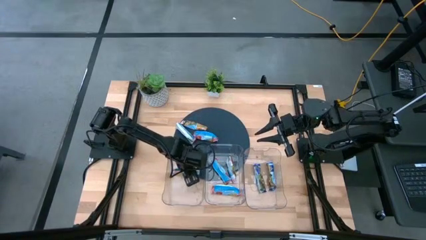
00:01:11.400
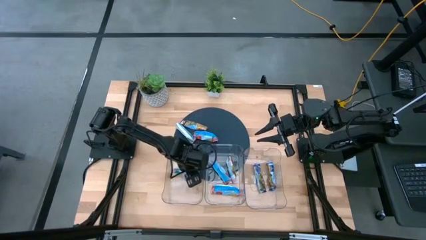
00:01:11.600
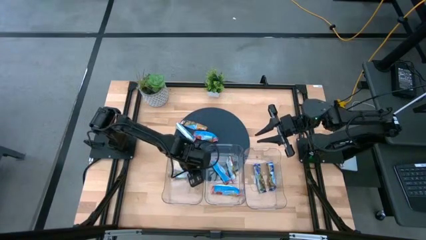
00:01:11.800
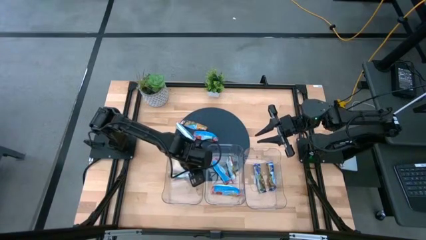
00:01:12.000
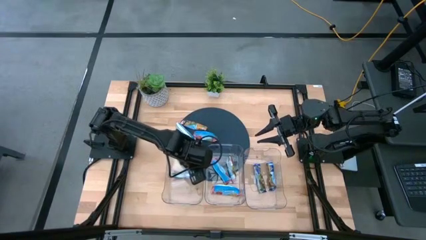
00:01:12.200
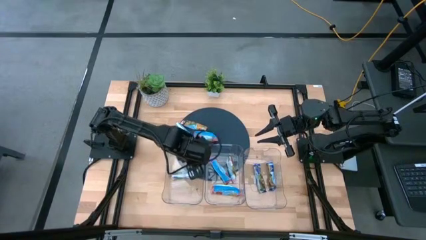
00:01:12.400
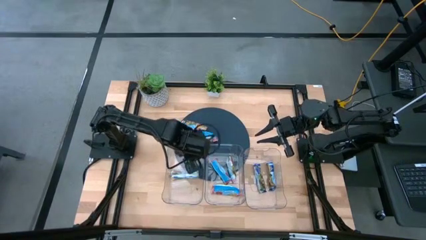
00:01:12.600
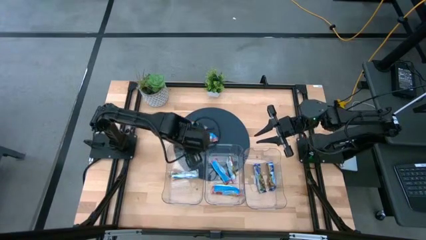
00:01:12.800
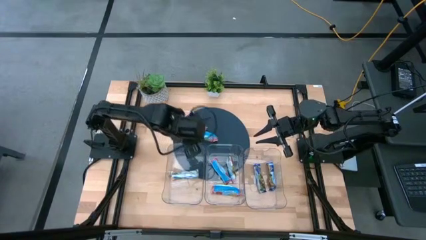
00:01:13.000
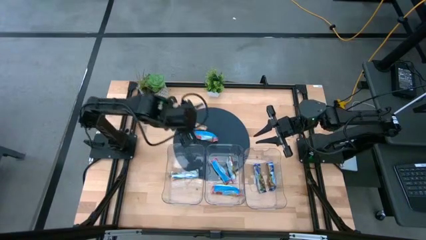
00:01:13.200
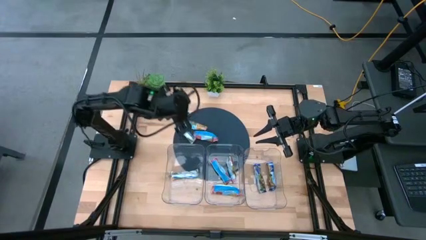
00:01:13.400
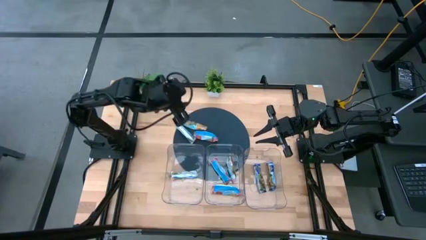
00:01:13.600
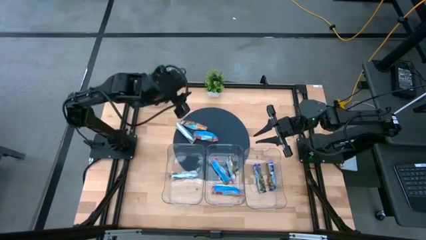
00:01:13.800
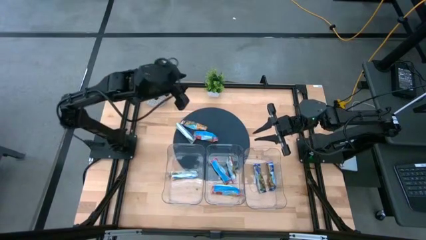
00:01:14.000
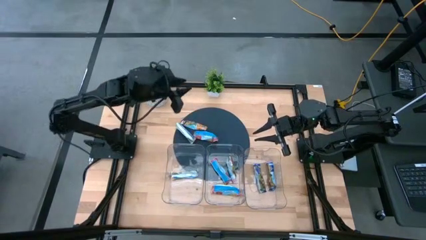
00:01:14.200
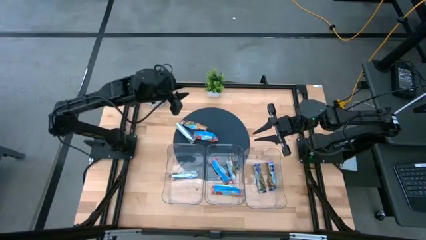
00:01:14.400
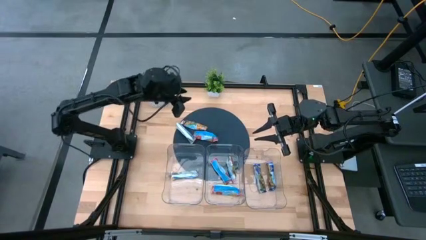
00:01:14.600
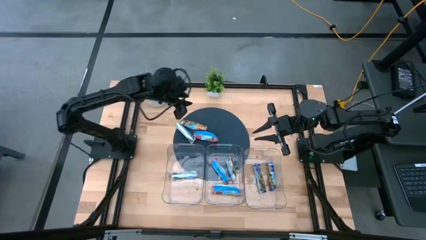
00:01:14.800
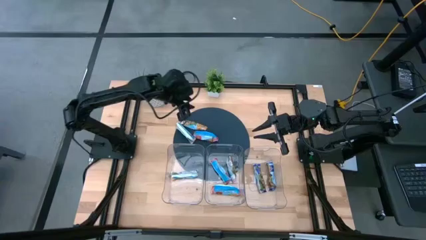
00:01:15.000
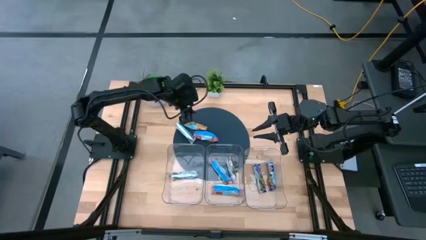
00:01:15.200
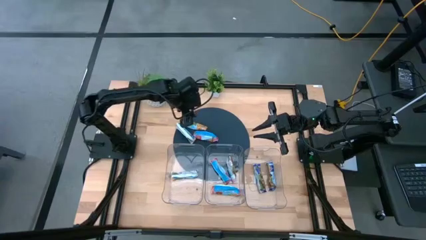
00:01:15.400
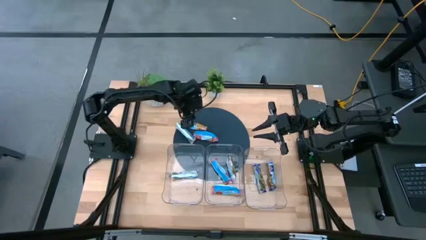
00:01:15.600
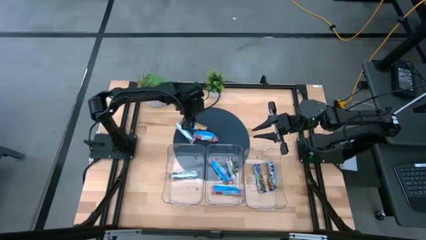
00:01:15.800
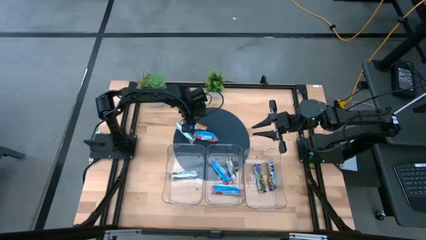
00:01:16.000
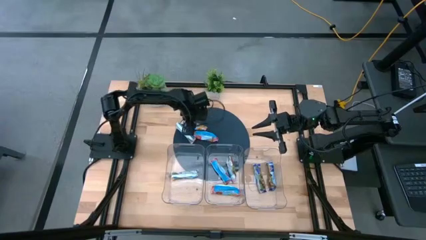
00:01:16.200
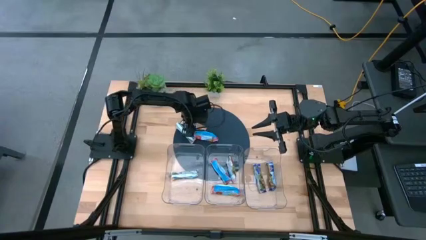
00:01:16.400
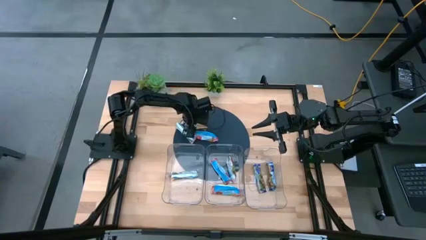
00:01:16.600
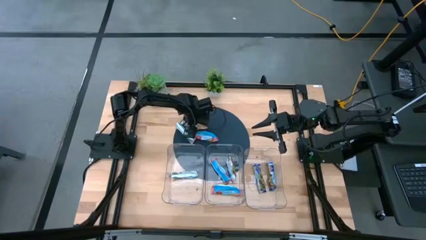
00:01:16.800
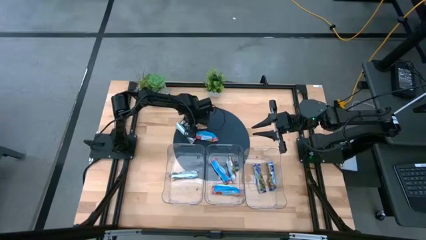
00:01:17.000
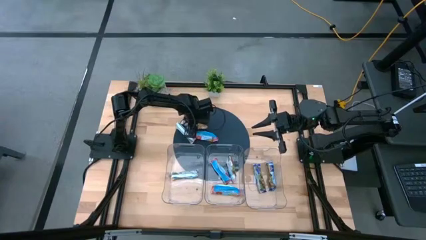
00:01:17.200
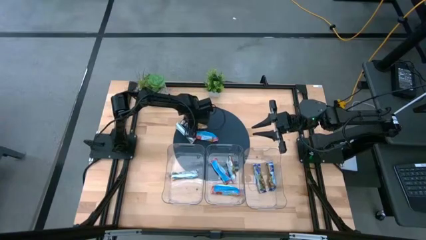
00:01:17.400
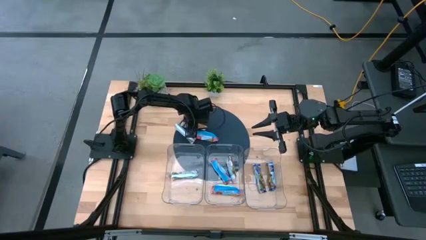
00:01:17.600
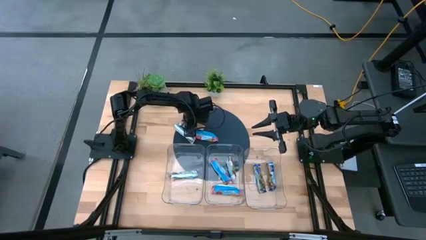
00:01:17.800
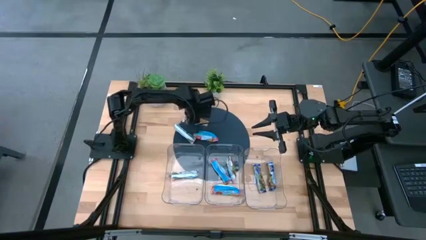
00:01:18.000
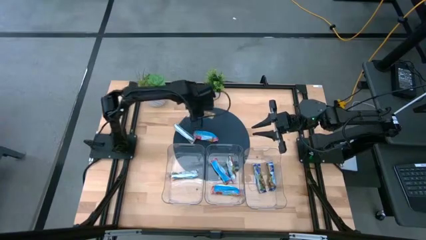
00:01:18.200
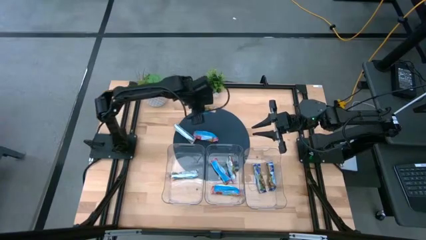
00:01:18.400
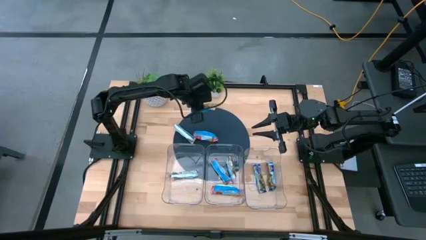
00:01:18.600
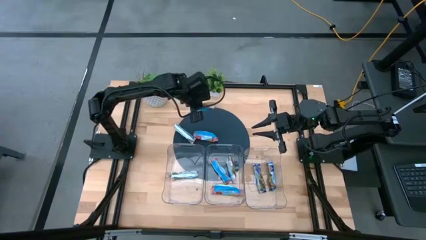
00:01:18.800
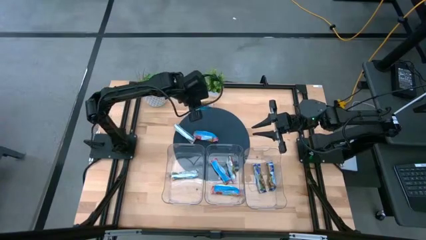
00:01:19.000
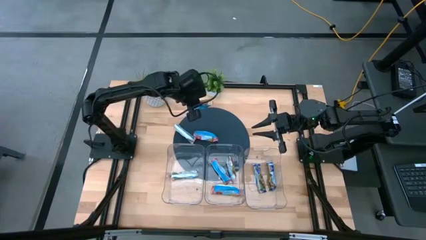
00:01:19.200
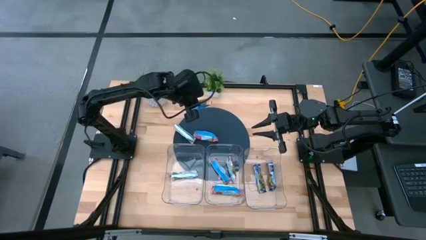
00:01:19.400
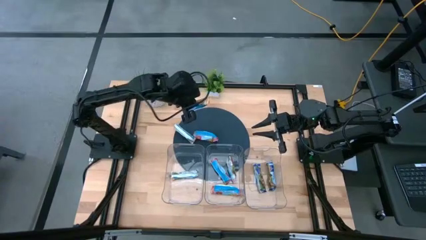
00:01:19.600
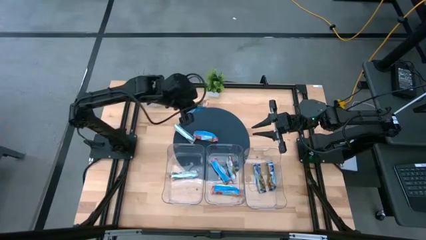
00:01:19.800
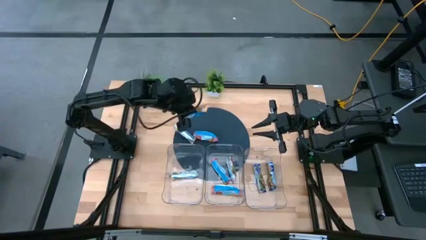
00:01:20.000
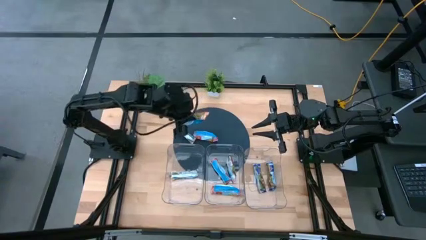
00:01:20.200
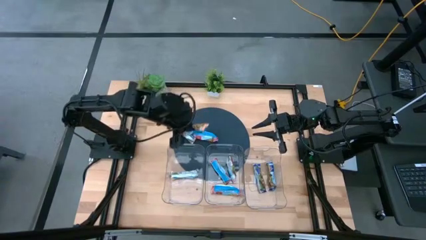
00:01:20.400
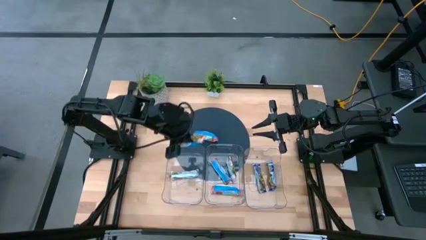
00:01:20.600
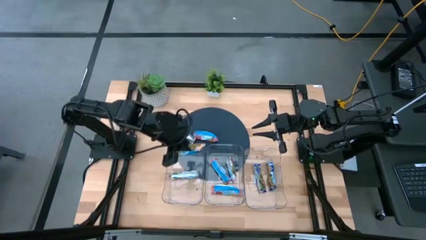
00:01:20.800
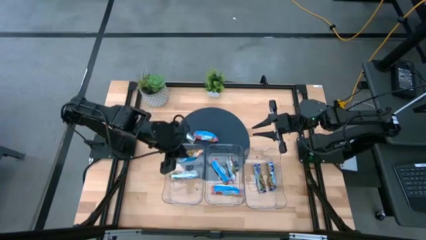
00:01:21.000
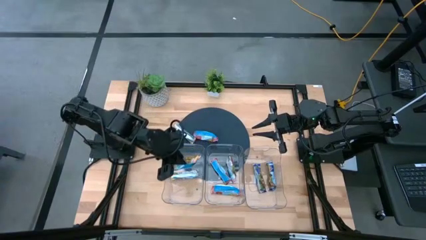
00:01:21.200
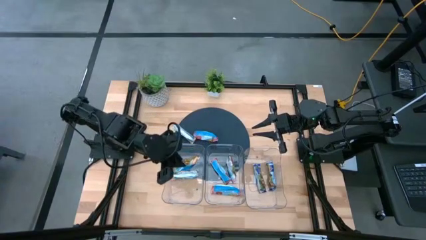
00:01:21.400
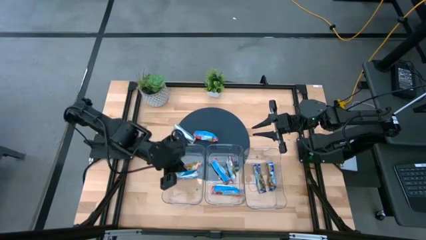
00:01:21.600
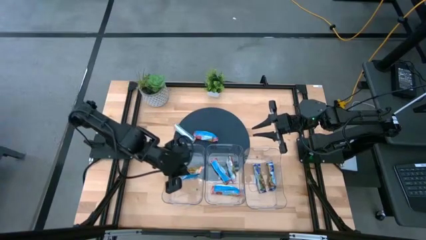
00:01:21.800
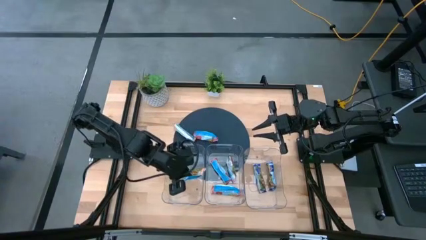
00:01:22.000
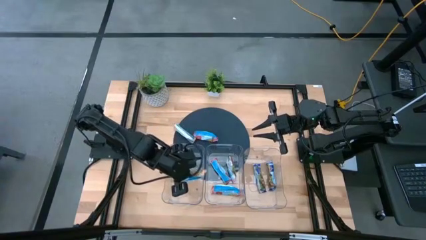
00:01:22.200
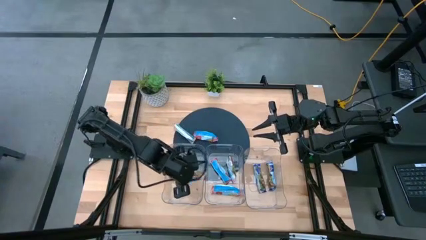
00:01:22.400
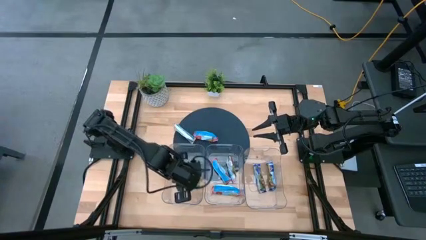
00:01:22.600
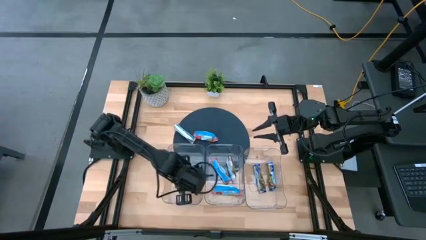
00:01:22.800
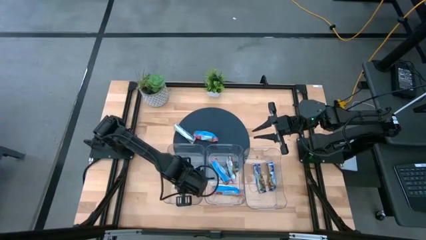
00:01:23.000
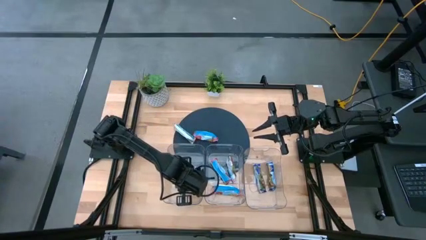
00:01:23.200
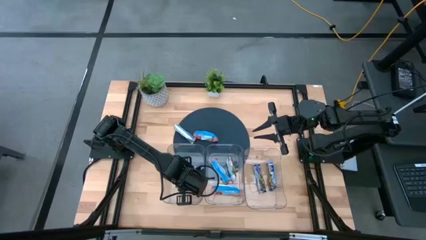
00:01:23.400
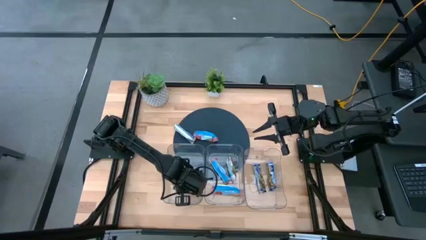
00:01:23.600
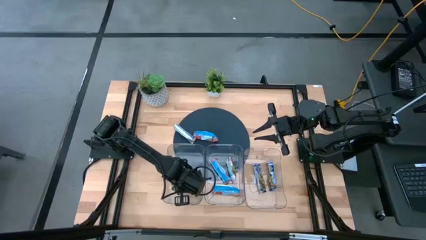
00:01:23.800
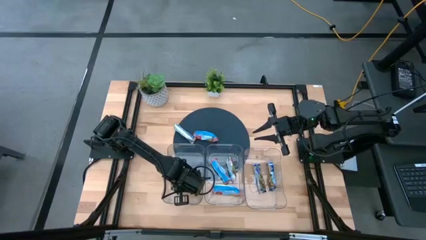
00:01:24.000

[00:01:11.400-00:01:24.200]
Task: Pick and place Granola Bars by type
Put the orange granola bar into the left transparent bin

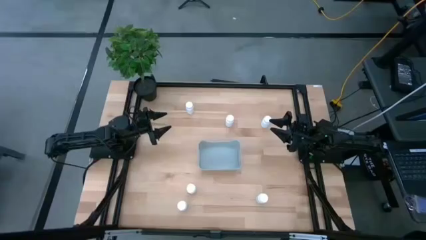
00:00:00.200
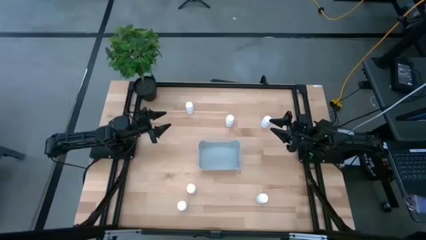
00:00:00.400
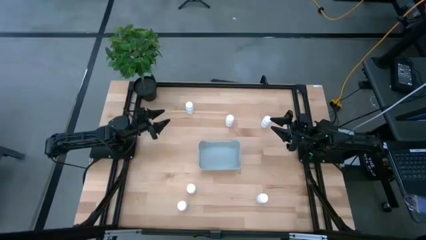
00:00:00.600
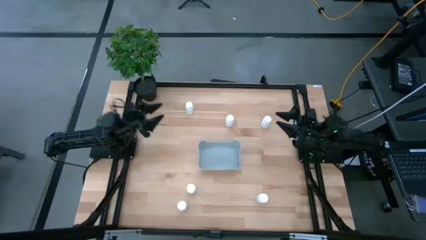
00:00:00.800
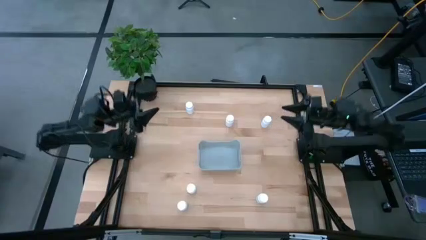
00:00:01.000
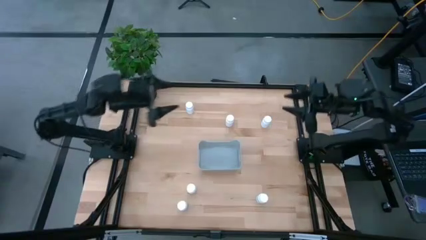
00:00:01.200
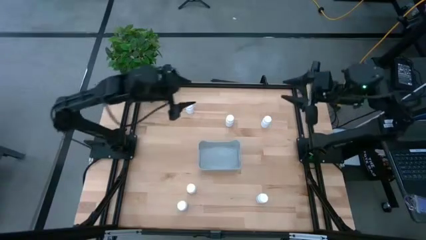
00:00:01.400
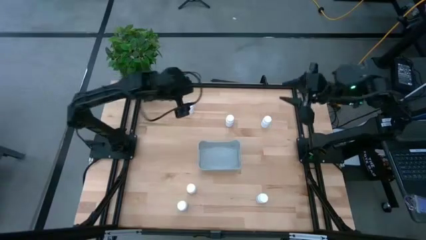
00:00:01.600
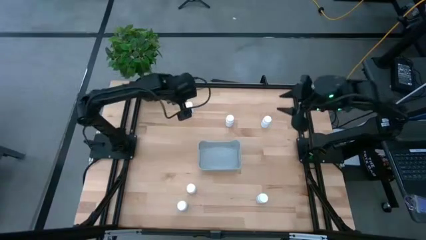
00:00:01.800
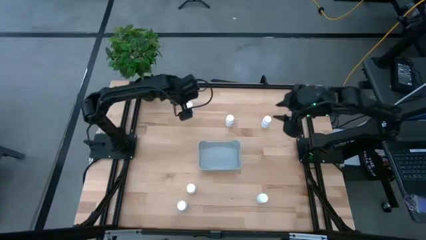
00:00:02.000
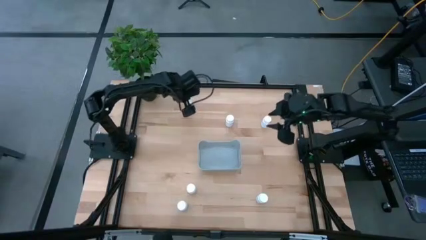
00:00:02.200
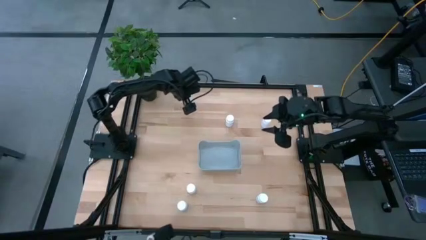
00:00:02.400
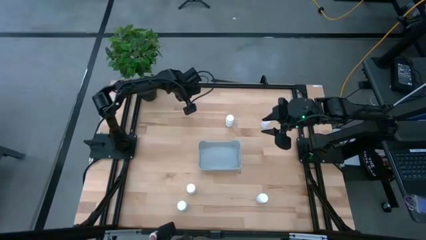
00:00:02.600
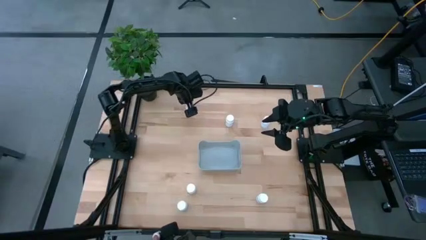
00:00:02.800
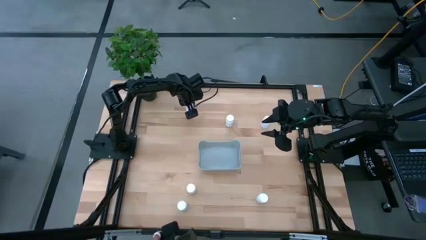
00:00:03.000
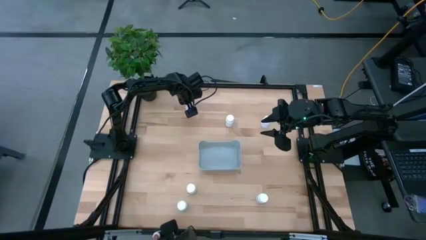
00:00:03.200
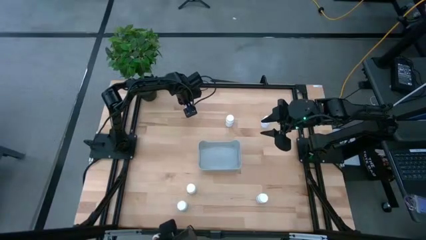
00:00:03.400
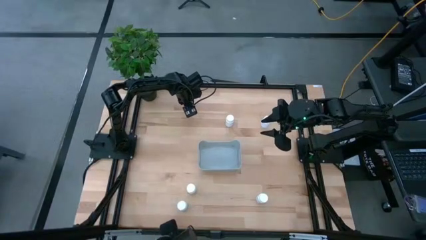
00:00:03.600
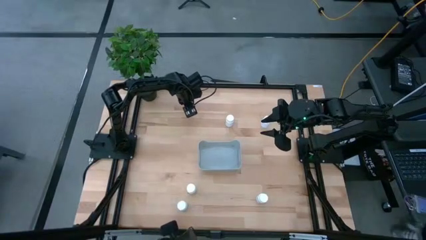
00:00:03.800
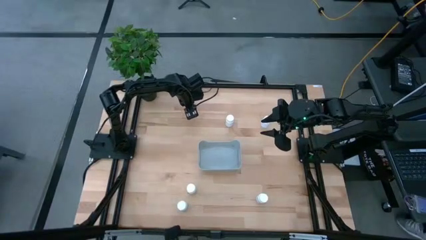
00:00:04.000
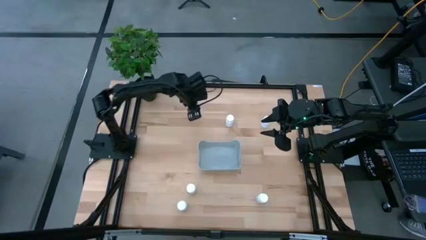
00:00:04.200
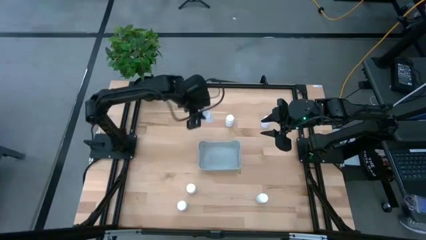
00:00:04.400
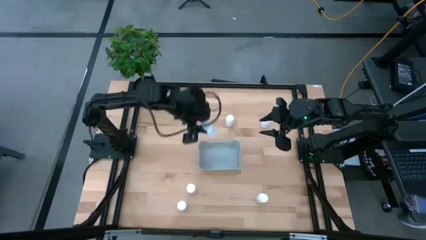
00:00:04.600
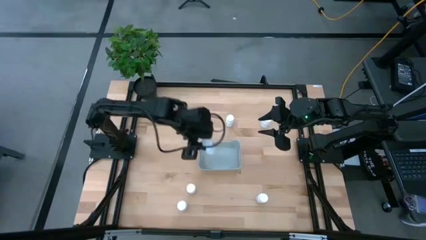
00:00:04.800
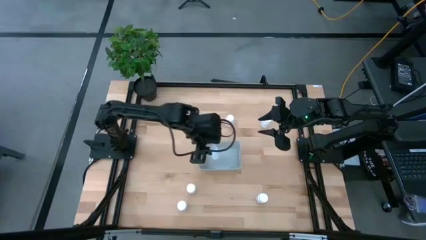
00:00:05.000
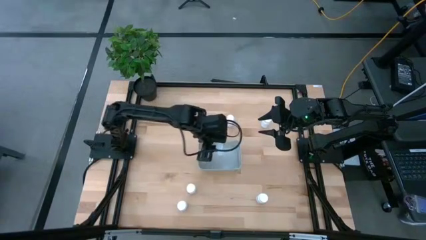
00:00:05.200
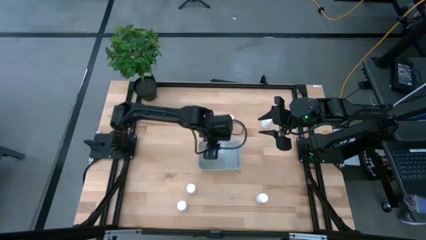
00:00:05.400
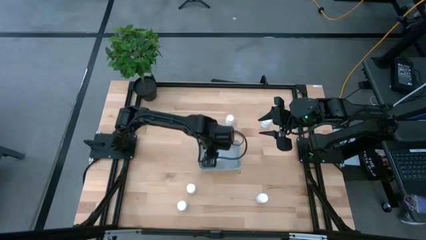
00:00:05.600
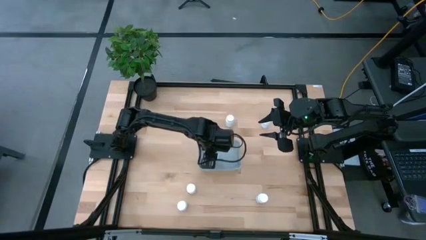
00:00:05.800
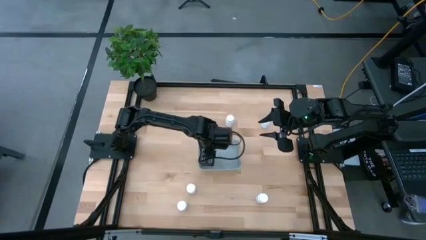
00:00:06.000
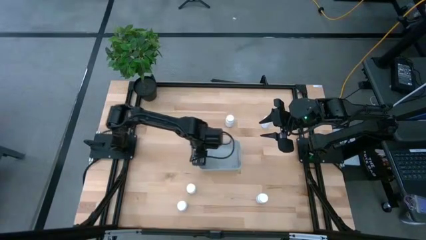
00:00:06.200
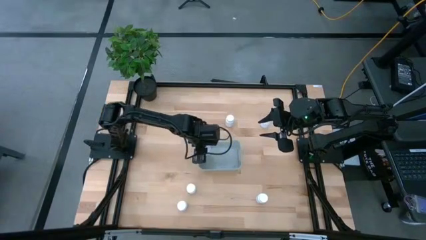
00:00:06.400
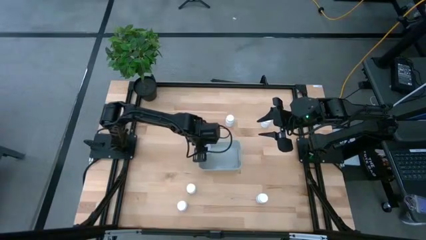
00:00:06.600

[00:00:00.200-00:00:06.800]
Task: Pick and place pill bottles into a basket
Put the white medicine bottle into the gray bin
